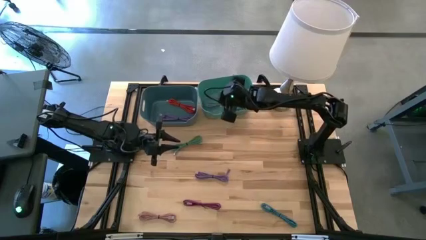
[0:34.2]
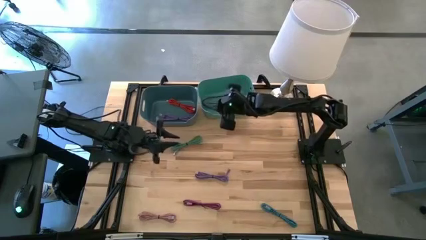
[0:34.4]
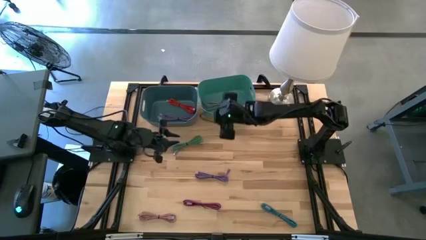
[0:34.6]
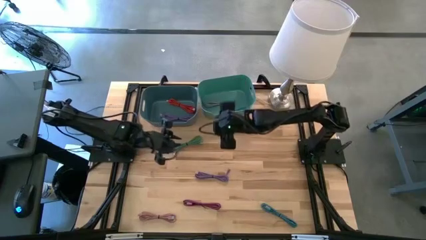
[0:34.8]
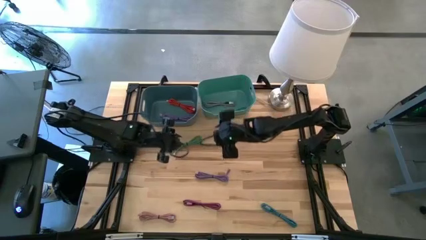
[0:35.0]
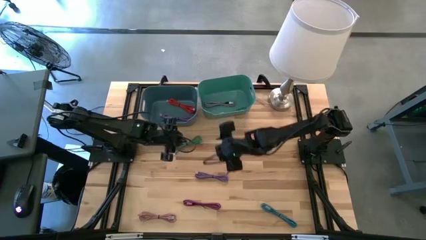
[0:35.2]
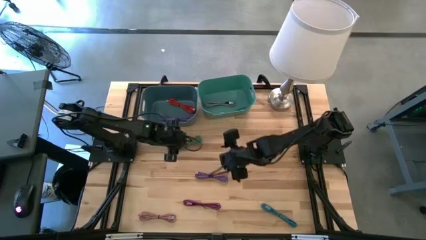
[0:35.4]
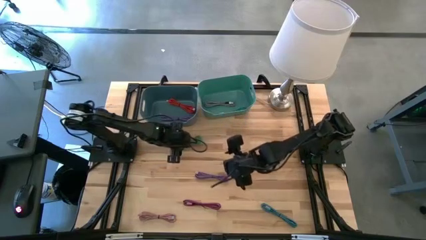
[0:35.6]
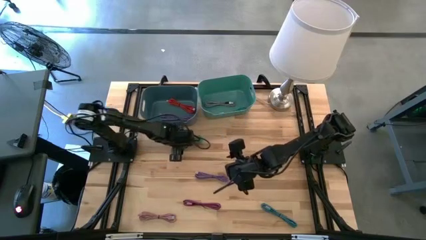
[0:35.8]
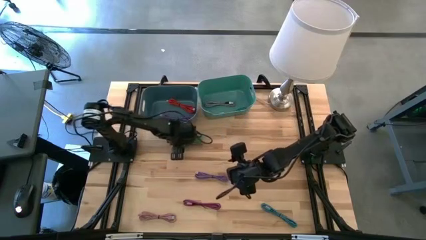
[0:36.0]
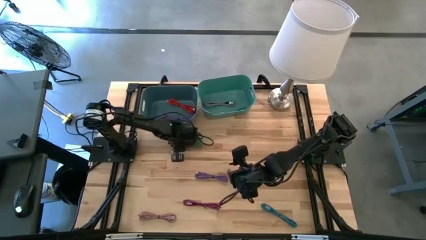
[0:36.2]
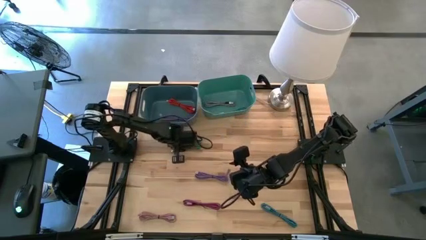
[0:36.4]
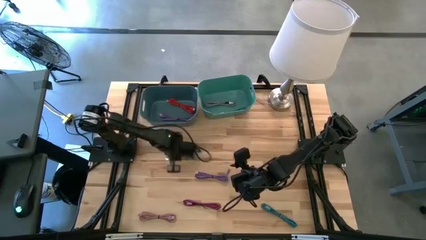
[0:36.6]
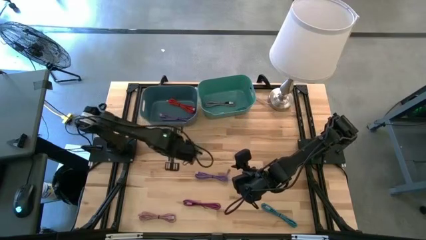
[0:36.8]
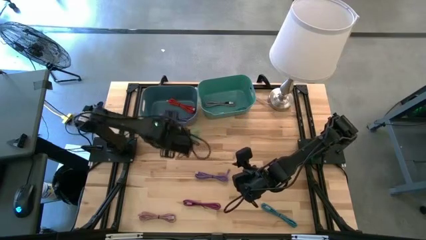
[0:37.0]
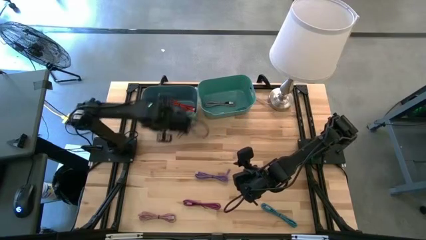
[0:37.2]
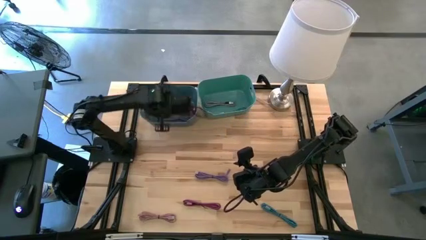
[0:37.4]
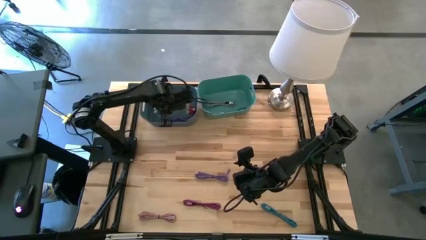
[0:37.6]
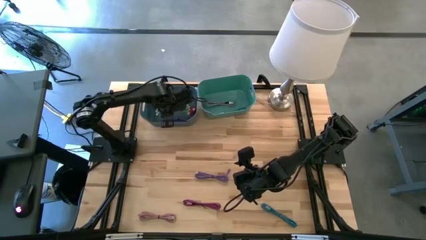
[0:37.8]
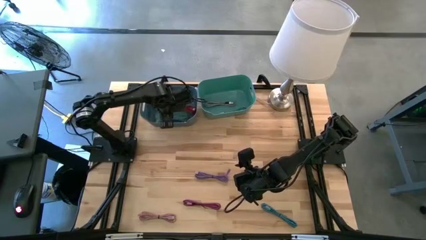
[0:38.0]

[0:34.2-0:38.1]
Task: Pick & Place USB Port
Put the green charger cable into the blue bin

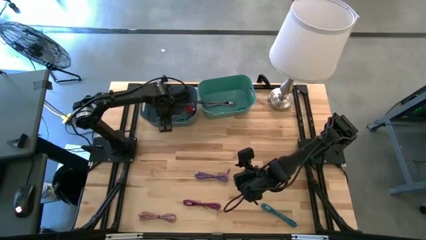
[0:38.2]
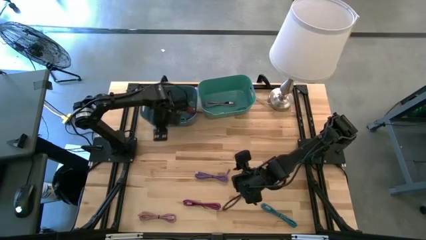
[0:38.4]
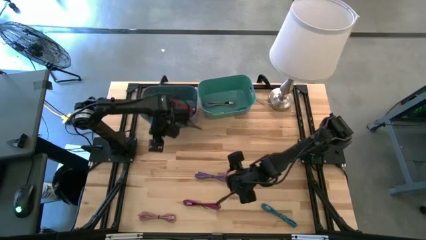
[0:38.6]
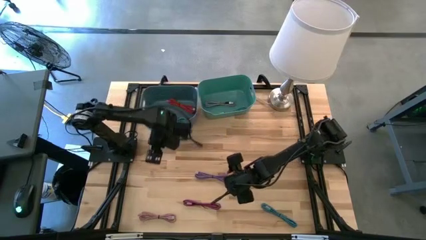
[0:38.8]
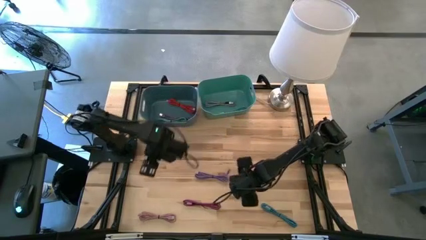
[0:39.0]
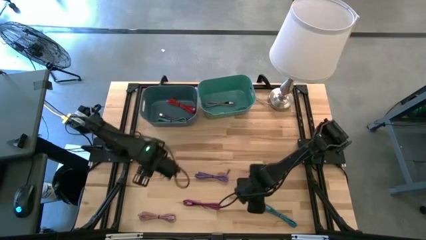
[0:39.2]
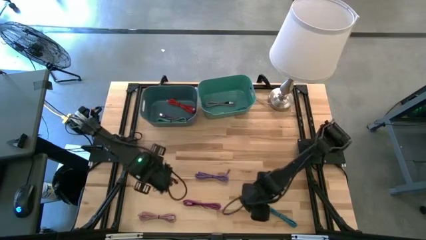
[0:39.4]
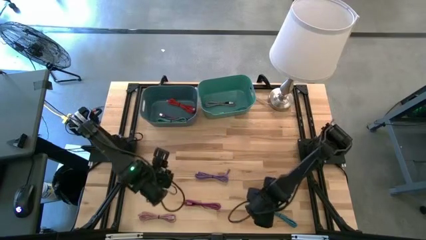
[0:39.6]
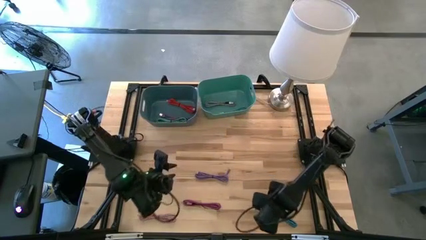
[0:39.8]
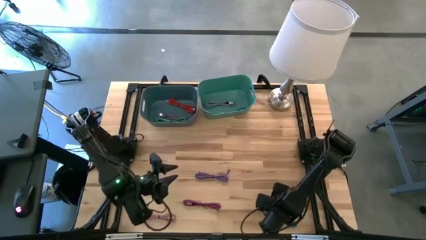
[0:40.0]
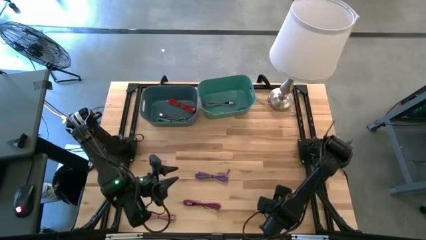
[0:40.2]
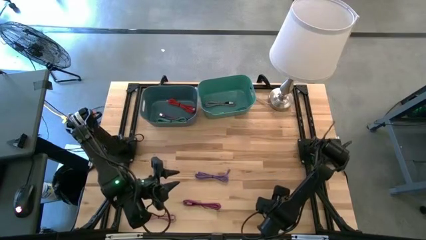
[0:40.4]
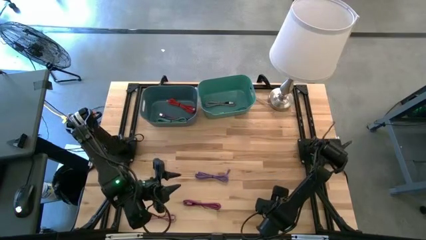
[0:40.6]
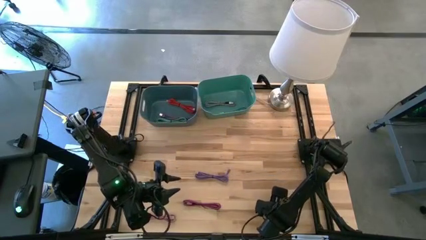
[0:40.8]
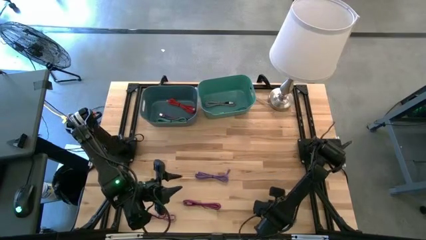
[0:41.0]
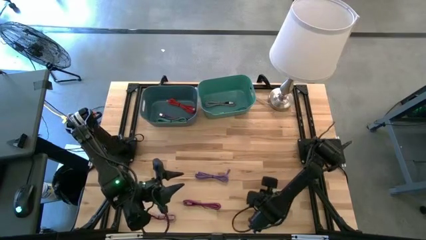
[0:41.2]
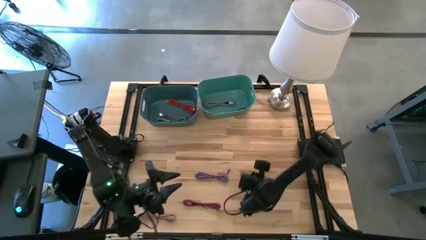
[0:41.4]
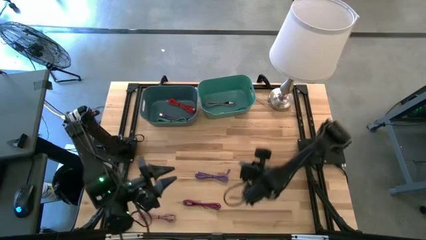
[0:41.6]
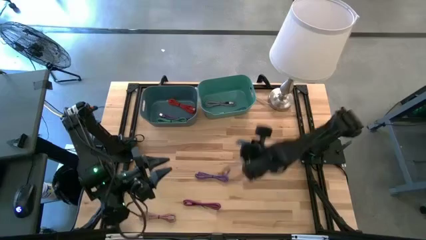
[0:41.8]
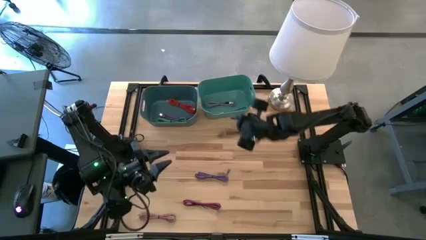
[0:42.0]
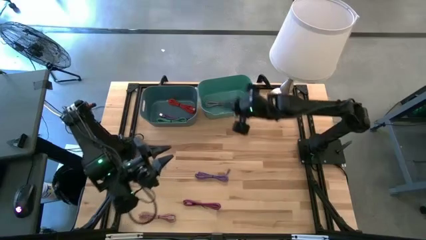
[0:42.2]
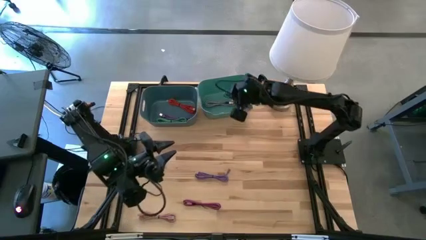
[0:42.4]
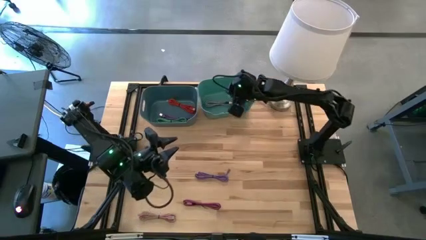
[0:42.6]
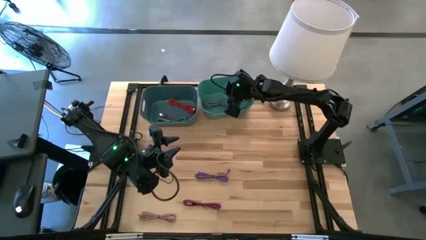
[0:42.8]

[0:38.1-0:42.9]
Put the black and blue charger cable into the green bin

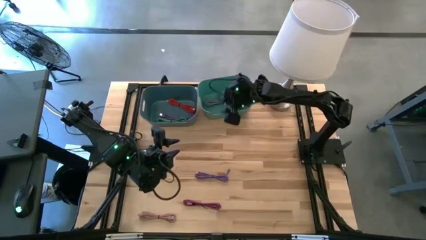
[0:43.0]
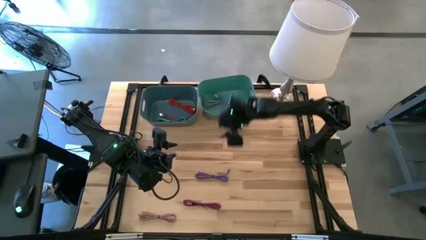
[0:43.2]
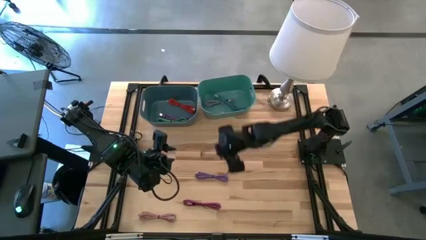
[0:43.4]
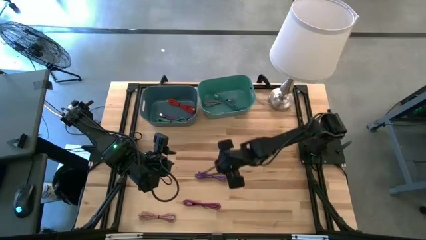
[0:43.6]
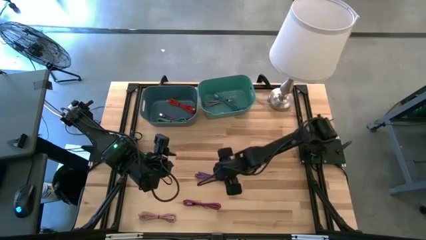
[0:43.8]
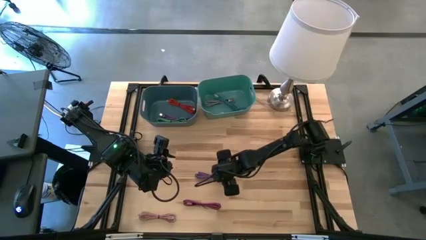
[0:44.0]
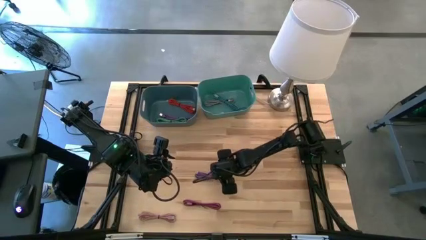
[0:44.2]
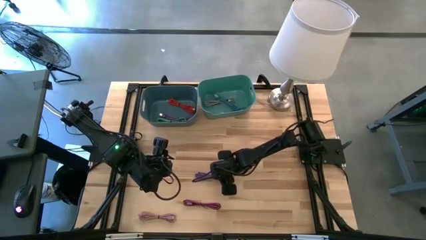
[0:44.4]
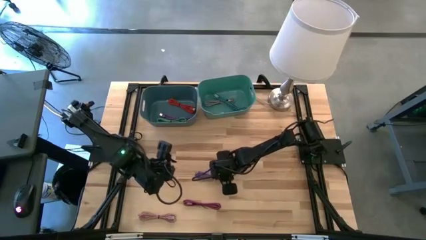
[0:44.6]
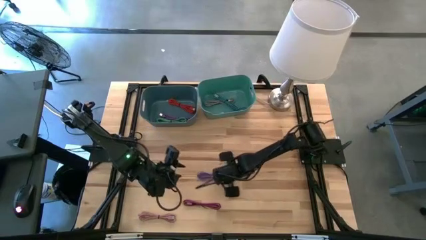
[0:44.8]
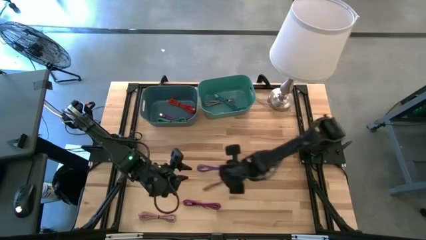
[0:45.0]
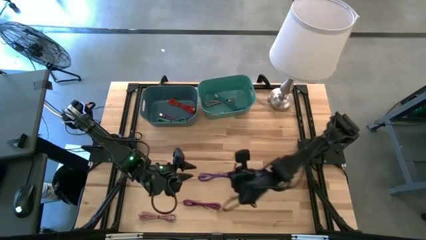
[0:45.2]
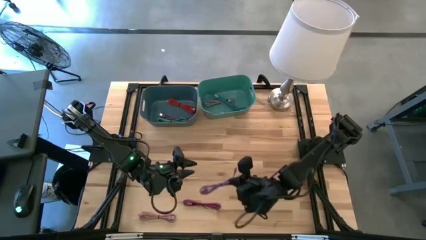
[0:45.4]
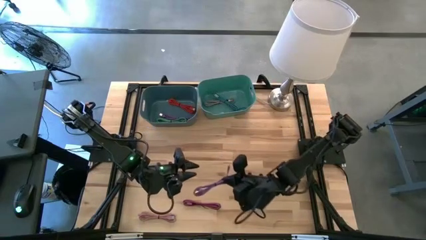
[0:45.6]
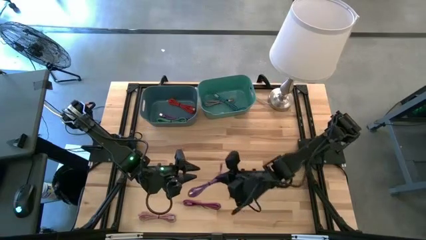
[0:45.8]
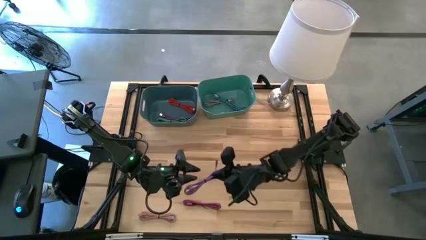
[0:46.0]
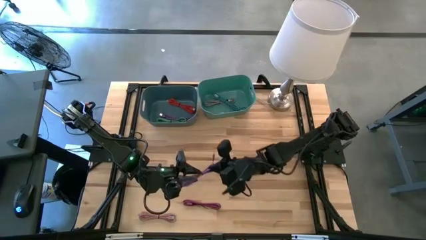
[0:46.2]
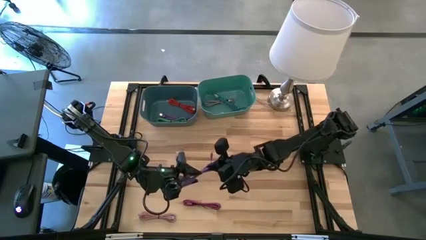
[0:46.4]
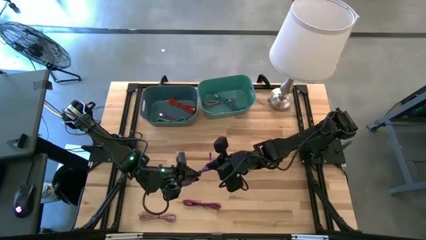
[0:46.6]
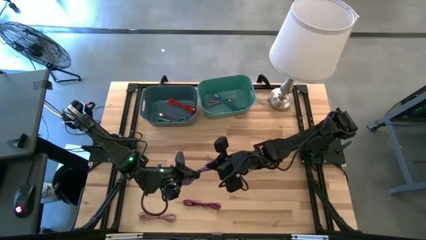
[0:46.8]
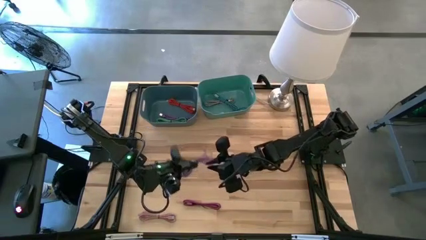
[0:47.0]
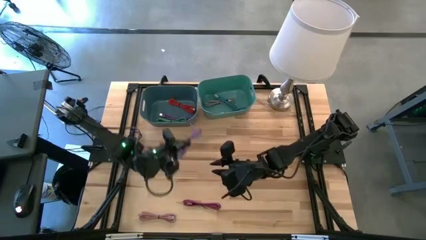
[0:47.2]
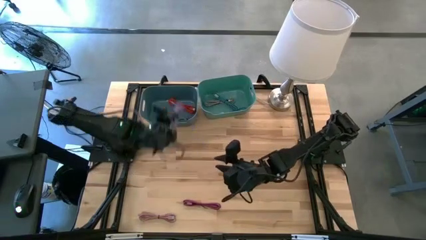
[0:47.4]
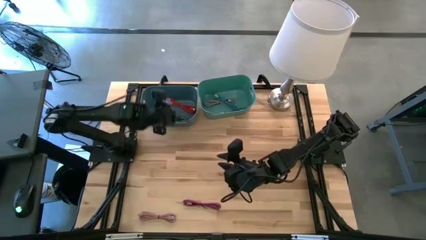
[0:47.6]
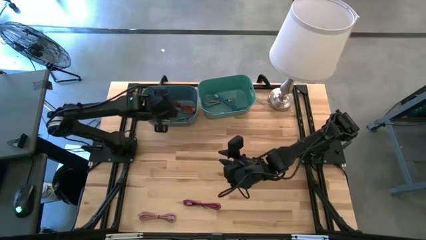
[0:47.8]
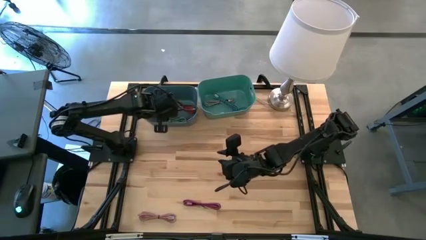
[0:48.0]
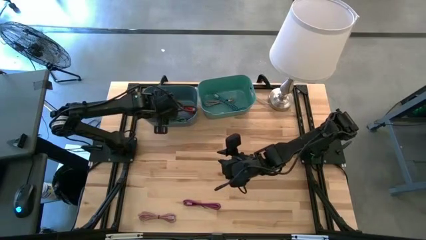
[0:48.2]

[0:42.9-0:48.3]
Put the purple charger cable into the blue bin

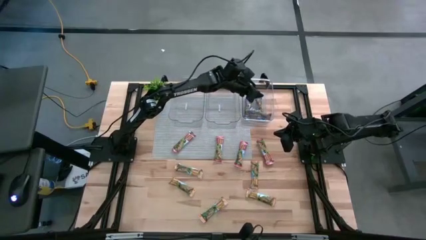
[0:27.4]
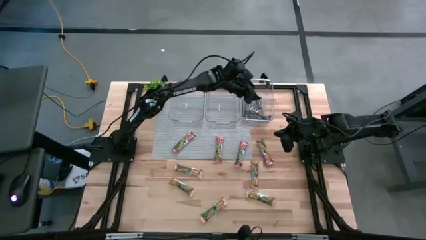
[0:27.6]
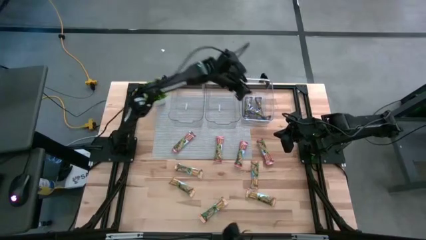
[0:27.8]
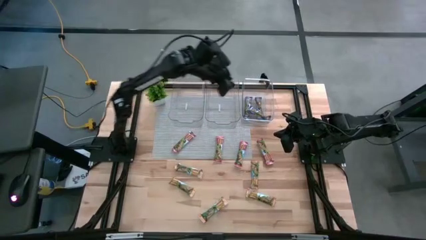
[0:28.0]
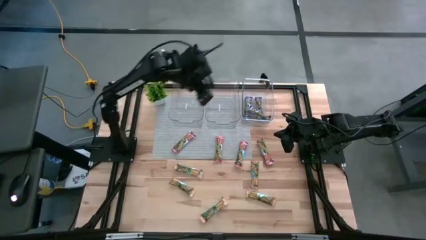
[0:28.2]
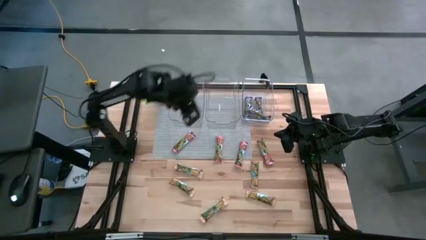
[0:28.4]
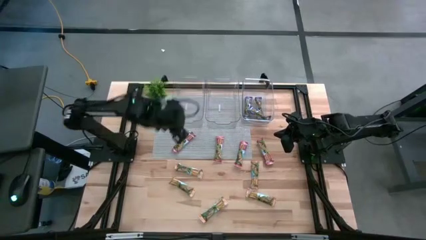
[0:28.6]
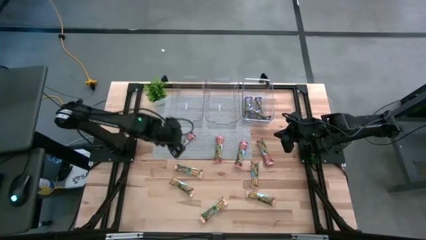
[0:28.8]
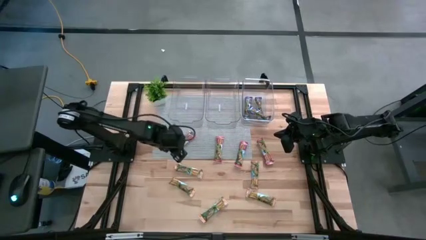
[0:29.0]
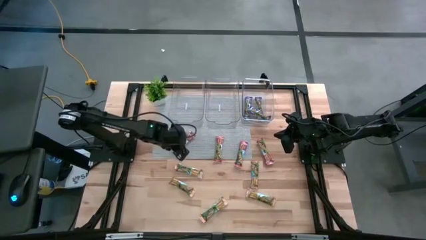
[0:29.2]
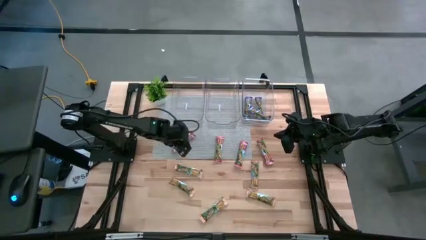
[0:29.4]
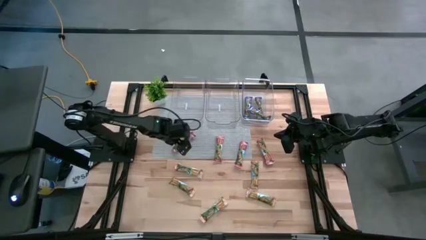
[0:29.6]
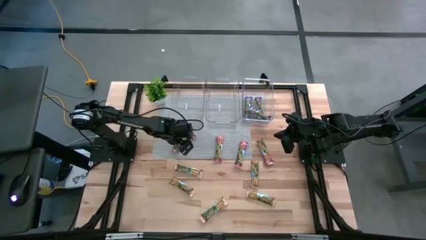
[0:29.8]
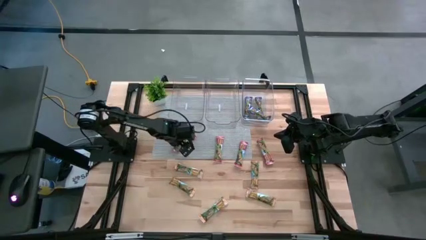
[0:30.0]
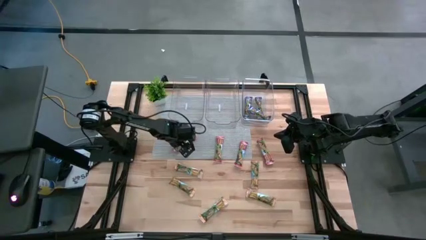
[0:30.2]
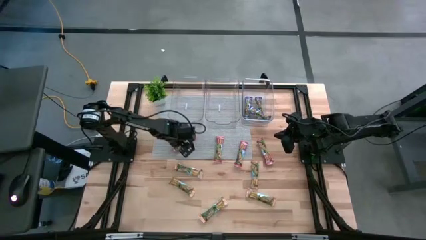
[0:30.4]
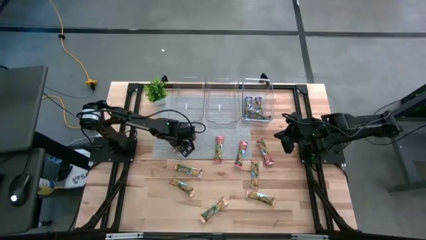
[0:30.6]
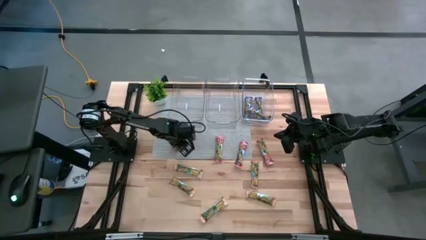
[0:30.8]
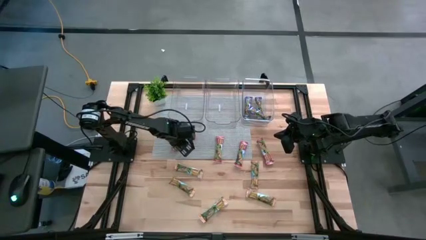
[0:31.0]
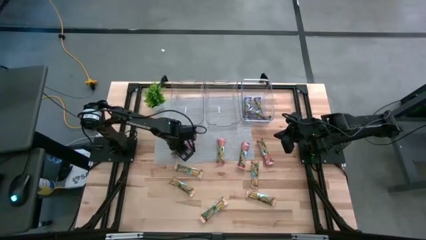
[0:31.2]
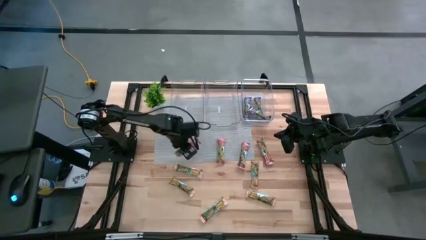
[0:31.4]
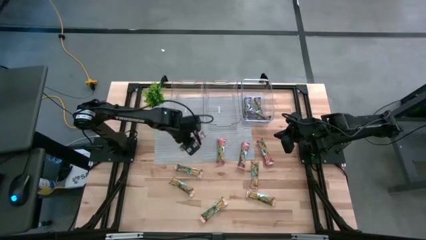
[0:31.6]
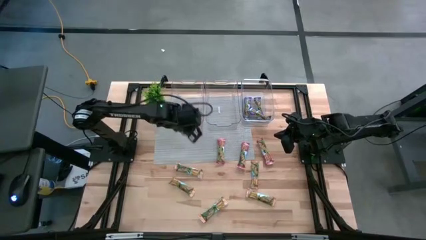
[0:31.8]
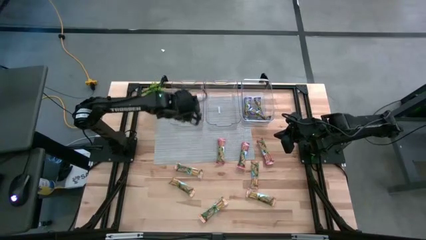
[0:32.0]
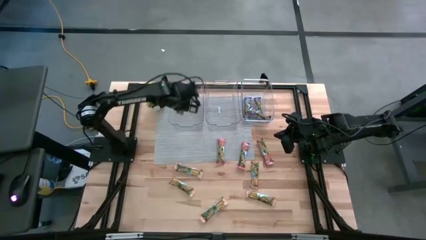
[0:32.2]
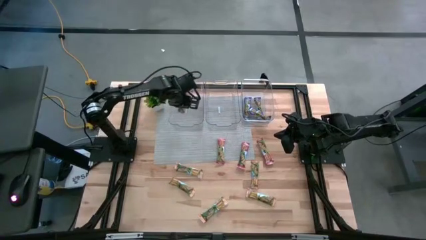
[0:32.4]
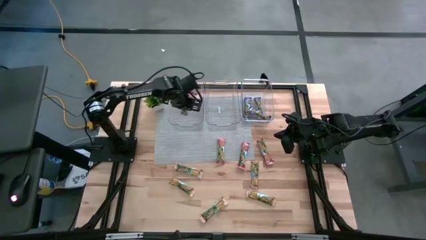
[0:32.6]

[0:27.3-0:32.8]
Task: Pick and place Granola Bars by type
Put the red granola bar into the left transparent bin
